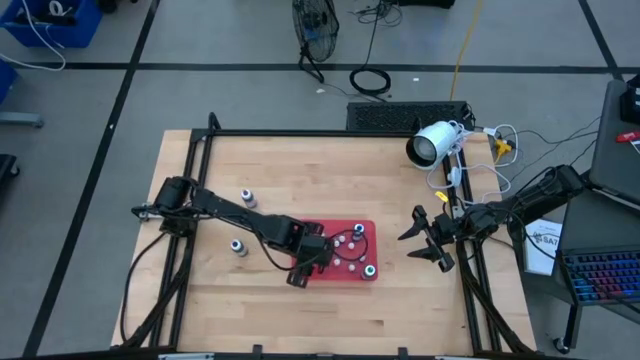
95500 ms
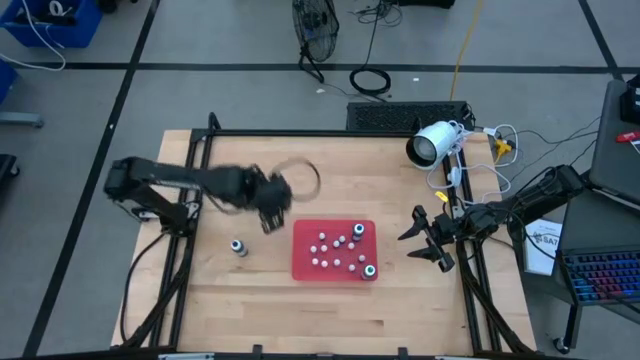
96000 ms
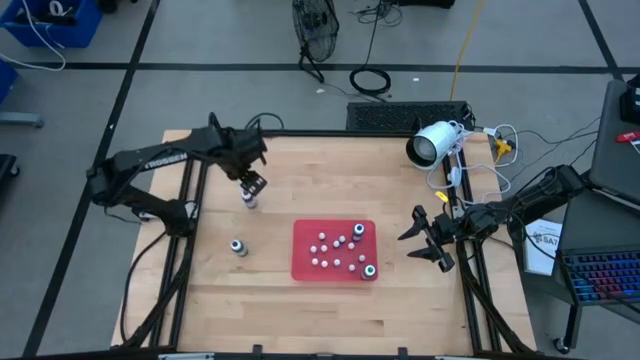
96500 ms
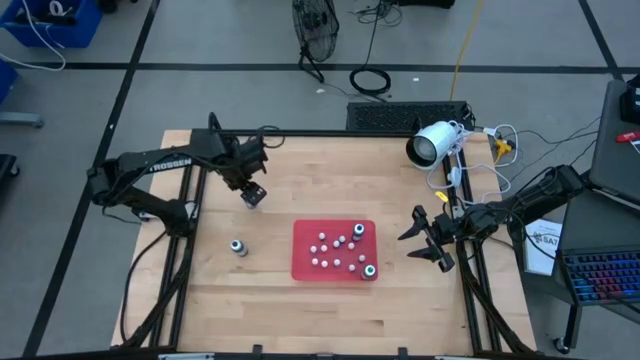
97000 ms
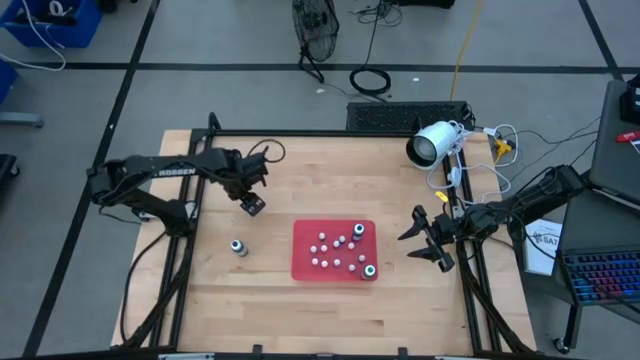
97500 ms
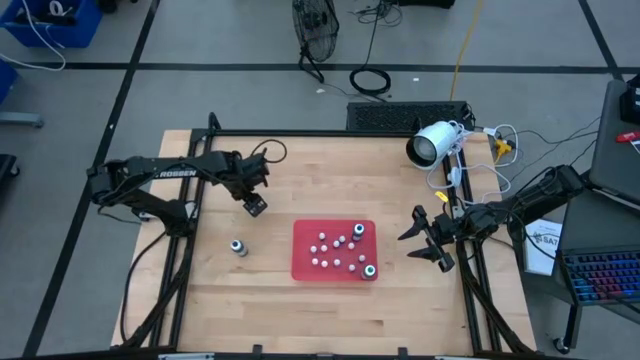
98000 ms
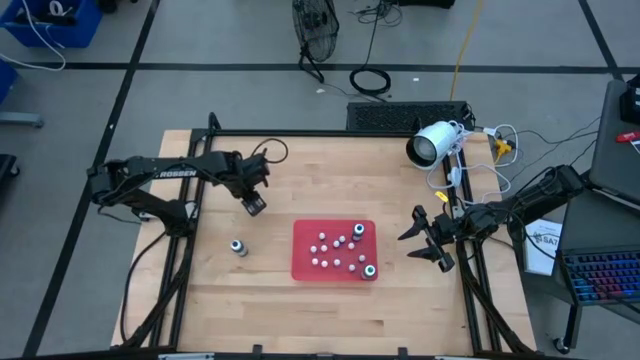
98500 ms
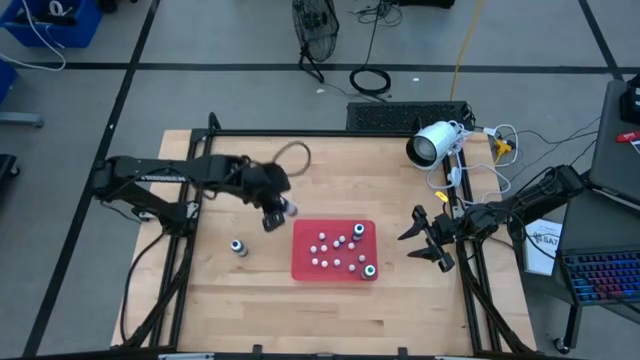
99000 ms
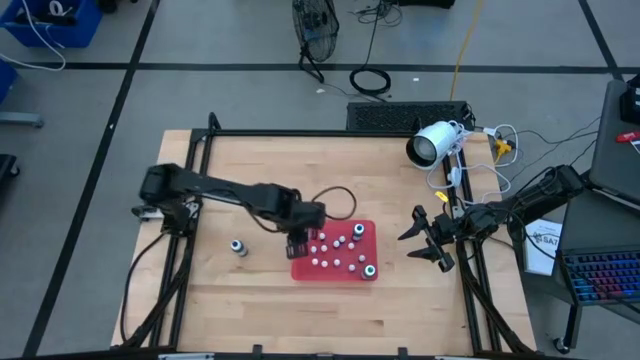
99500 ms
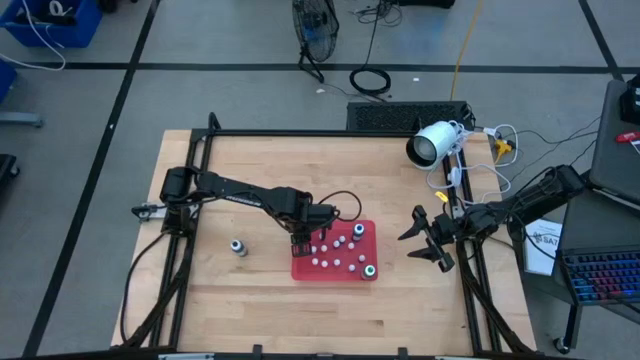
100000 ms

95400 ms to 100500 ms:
Task: Pick & Place food coloring
Put the large violet food coloring bottle into the pink bin

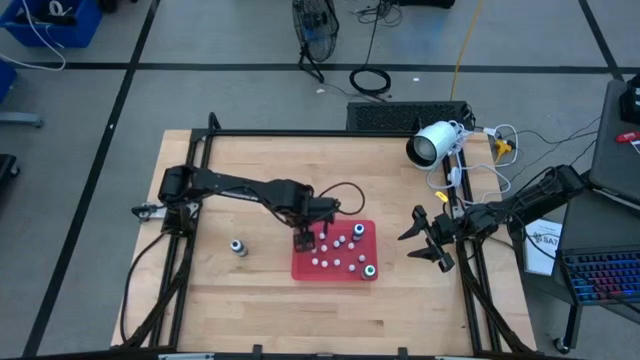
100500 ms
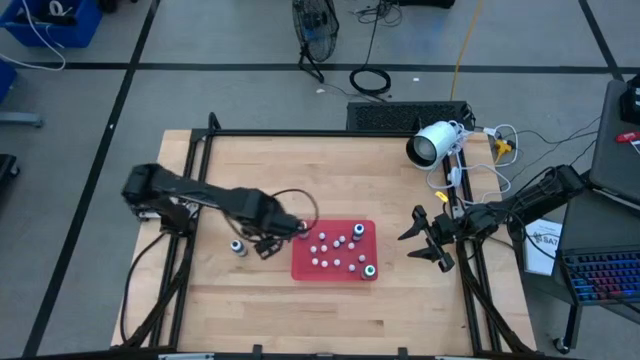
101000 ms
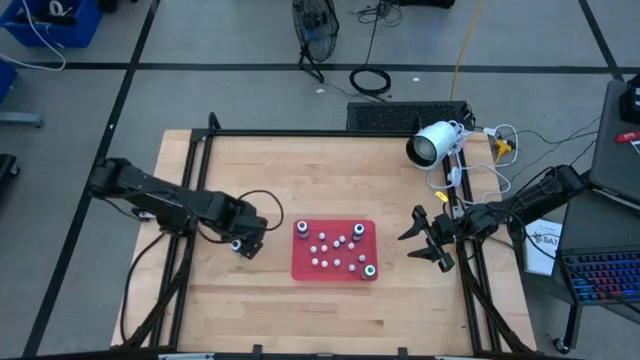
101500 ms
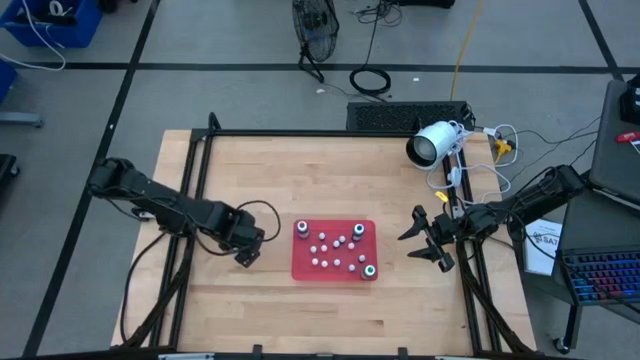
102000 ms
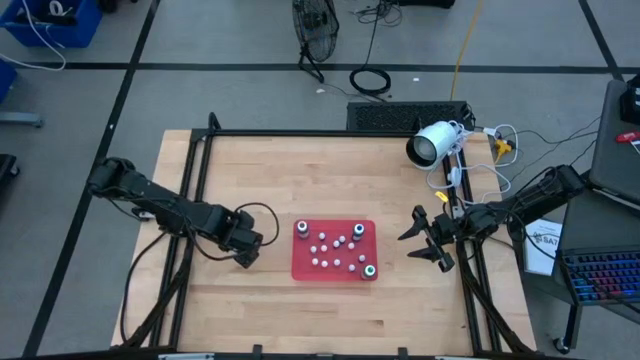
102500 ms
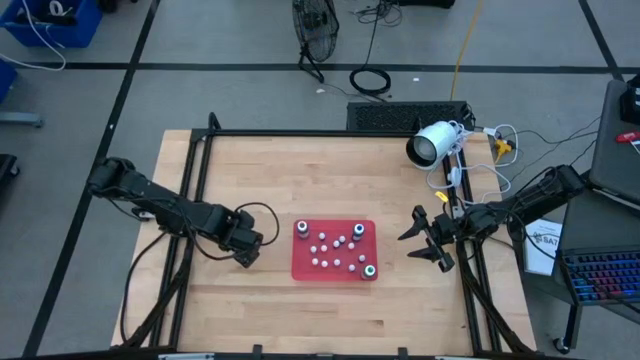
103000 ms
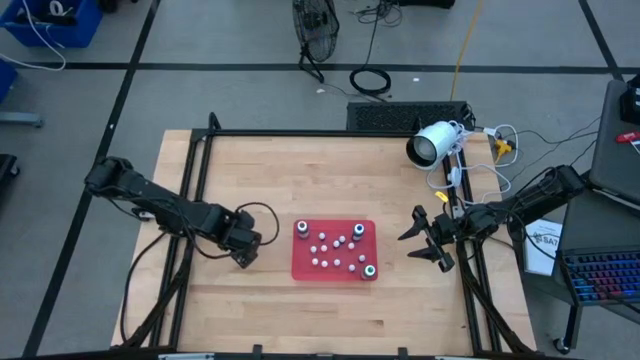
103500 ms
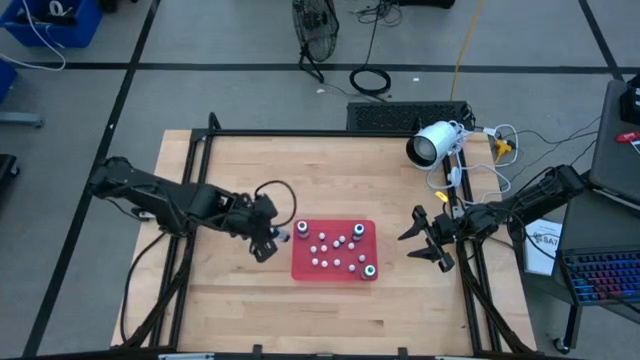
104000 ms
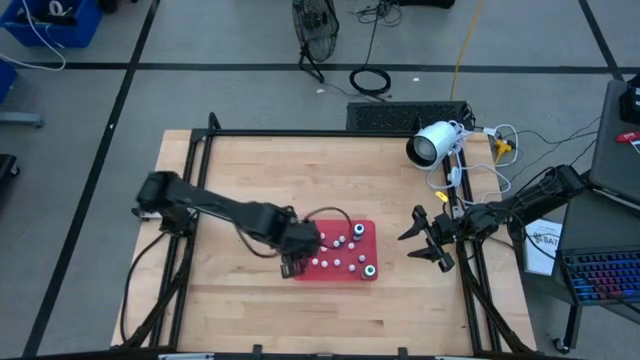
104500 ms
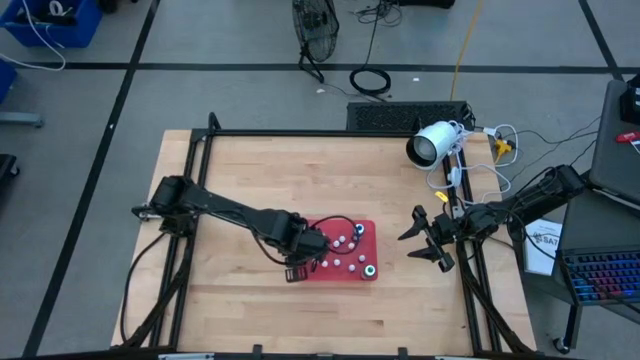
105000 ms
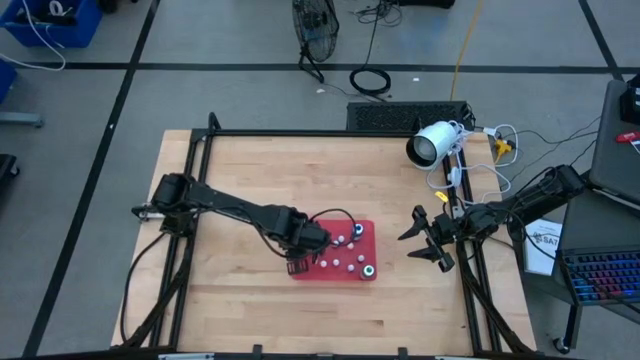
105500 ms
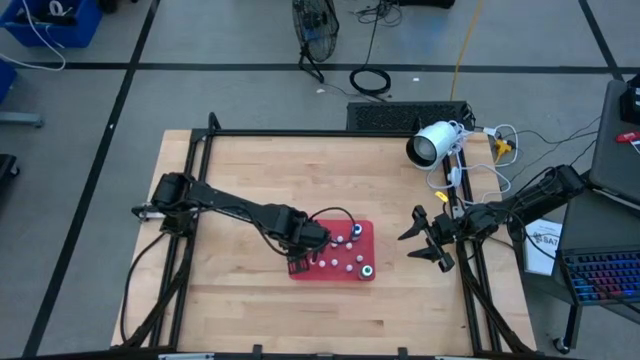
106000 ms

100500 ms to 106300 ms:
Put the large black food coloring bottle into the pink bin

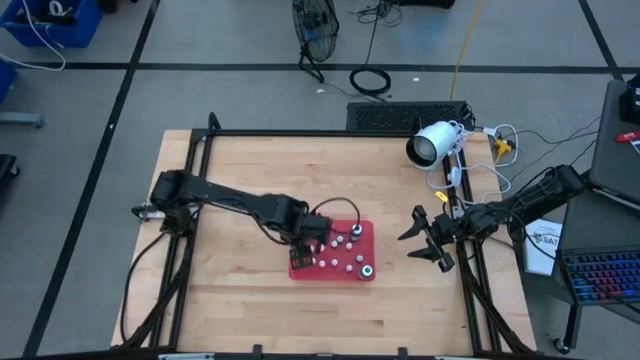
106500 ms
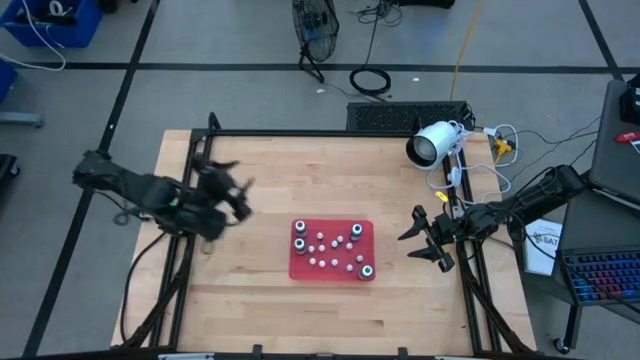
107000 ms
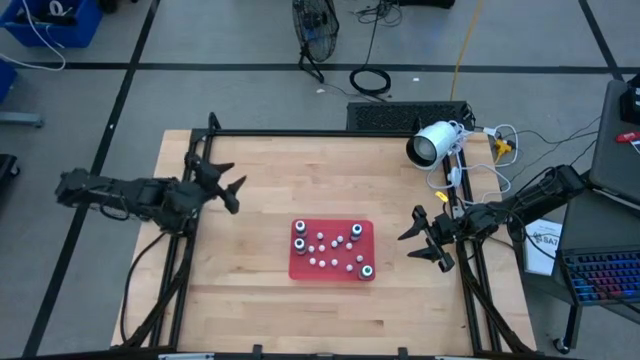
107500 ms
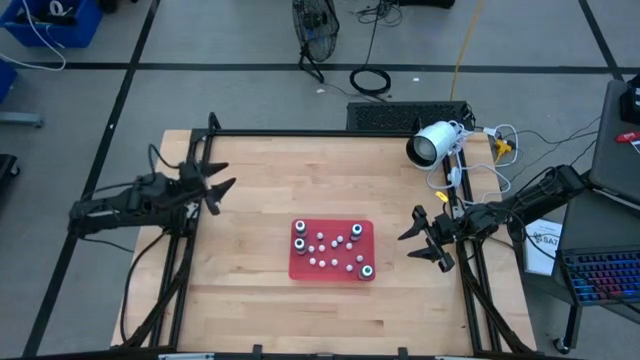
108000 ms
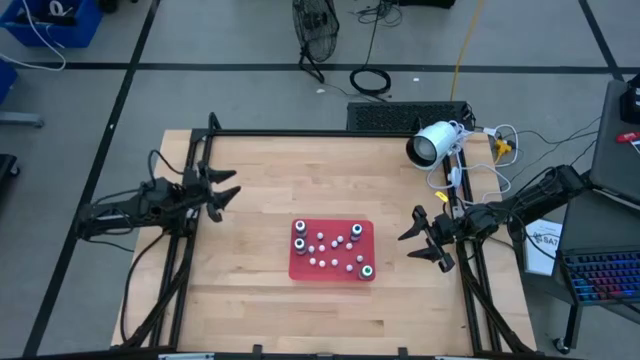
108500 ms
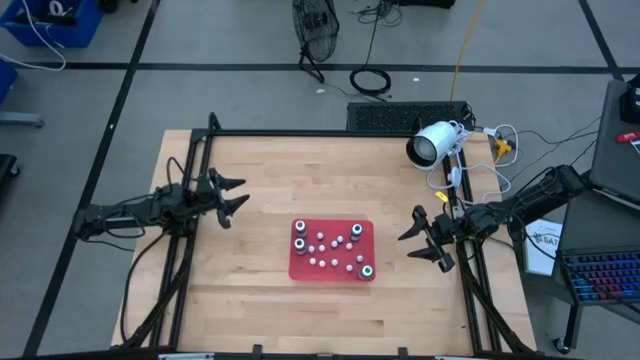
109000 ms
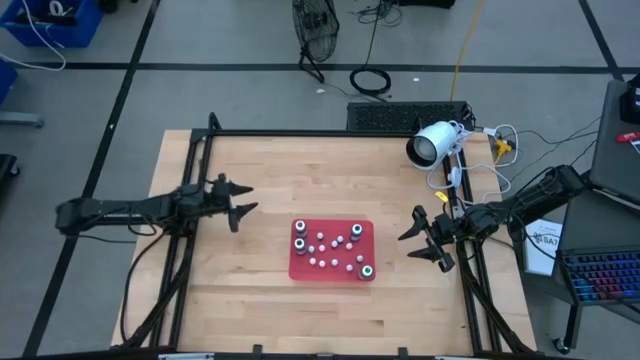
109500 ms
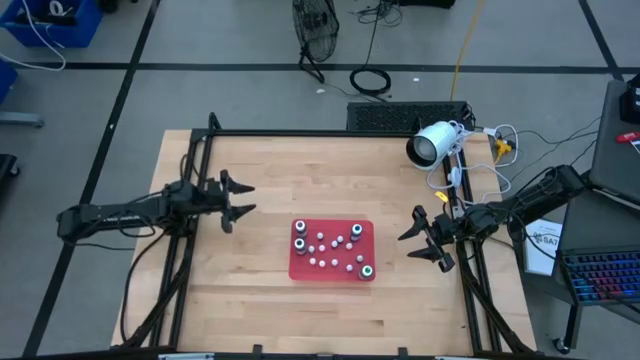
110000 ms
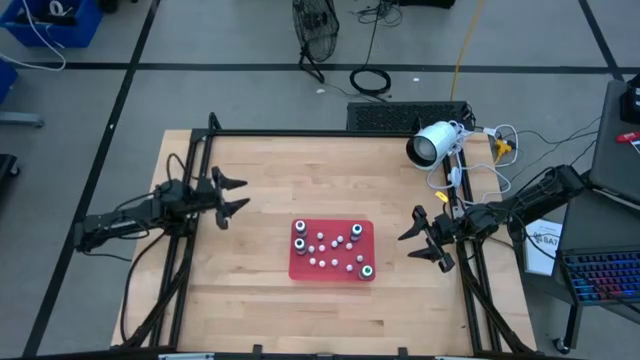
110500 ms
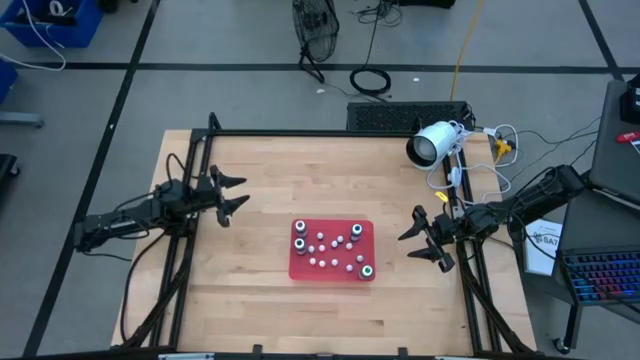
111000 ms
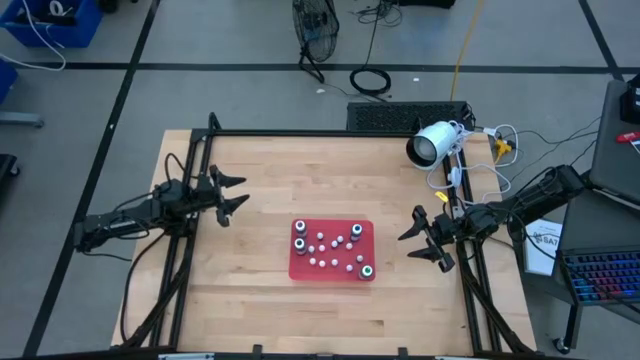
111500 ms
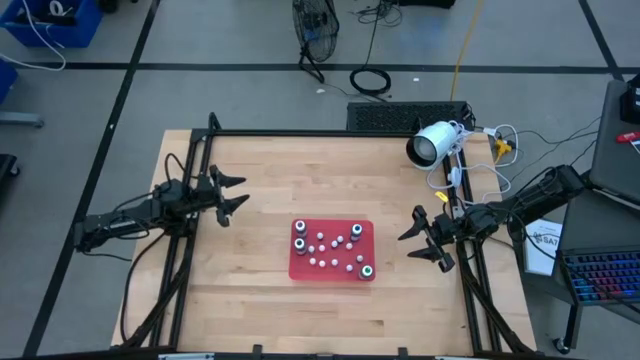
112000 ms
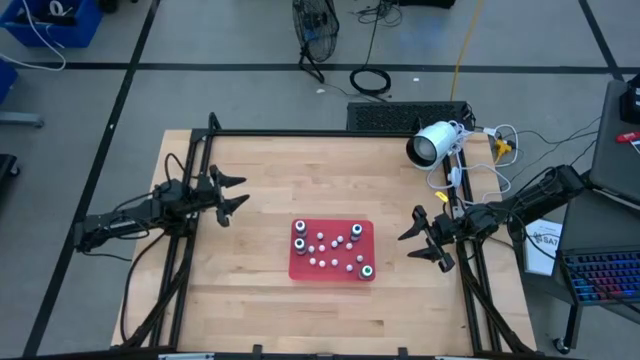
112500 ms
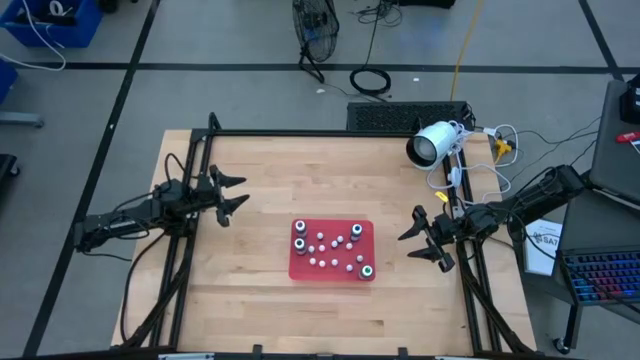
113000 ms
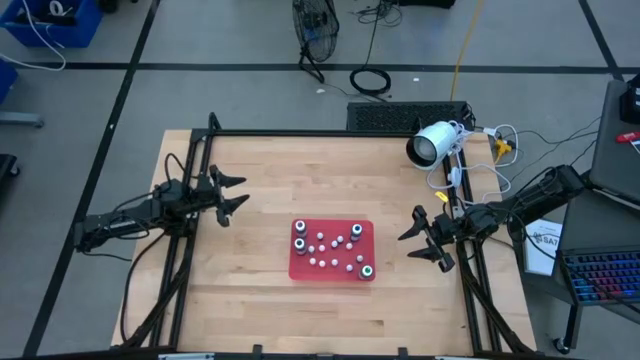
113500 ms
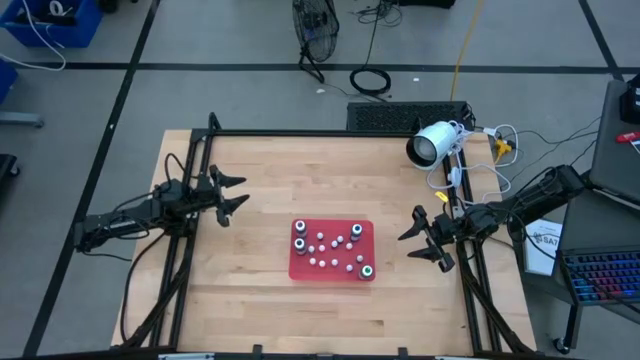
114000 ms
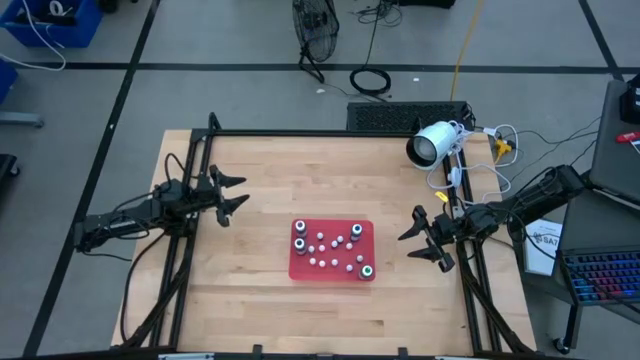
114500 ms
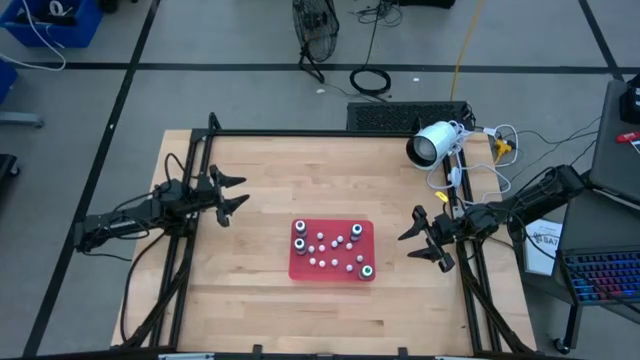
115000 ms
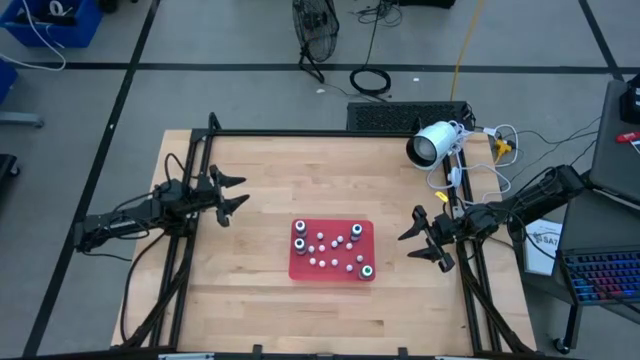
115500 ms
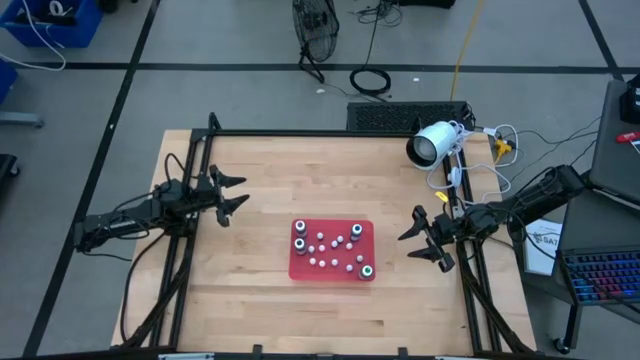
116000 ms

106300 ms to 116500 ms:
Return to Home Position

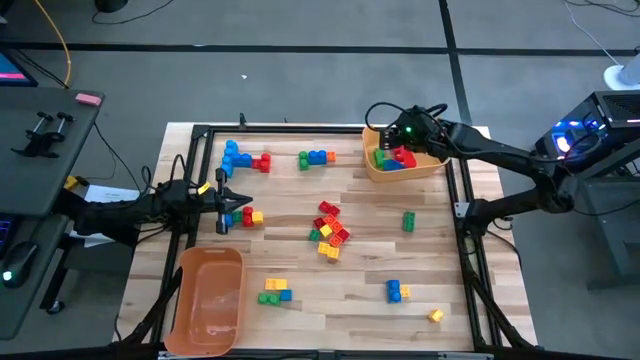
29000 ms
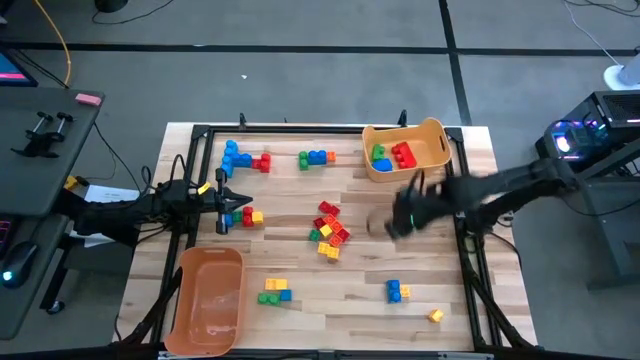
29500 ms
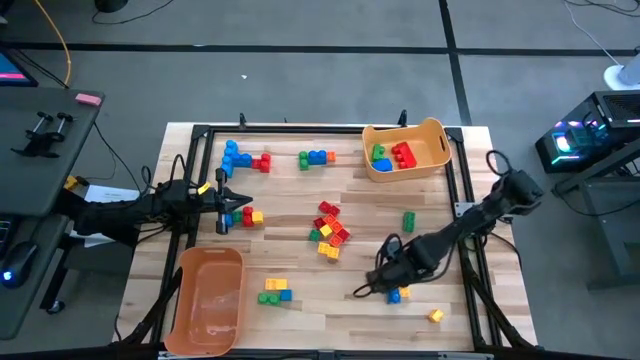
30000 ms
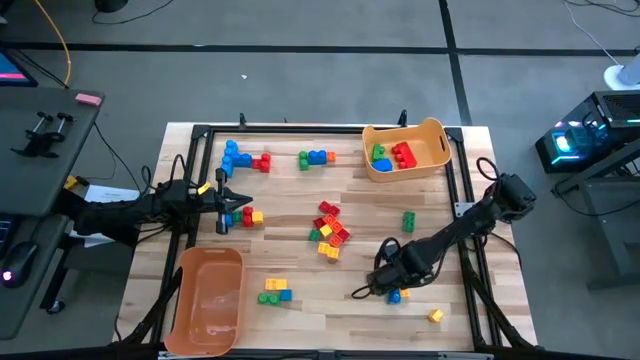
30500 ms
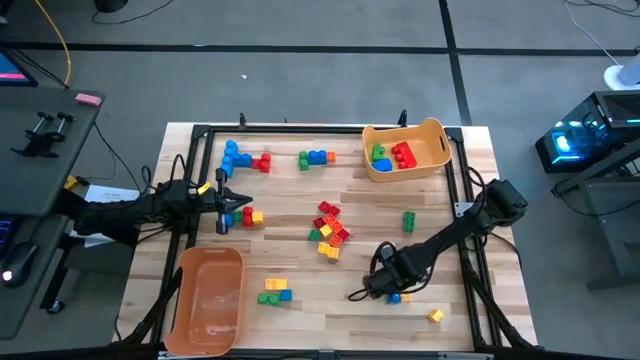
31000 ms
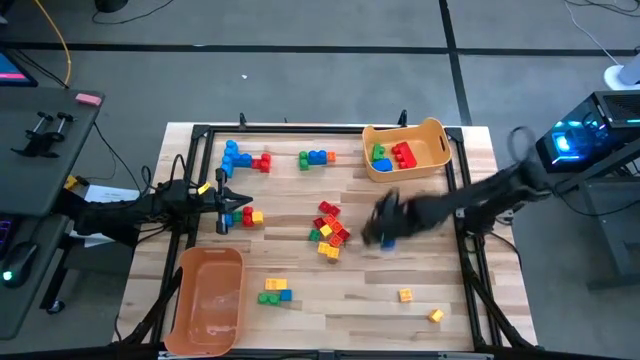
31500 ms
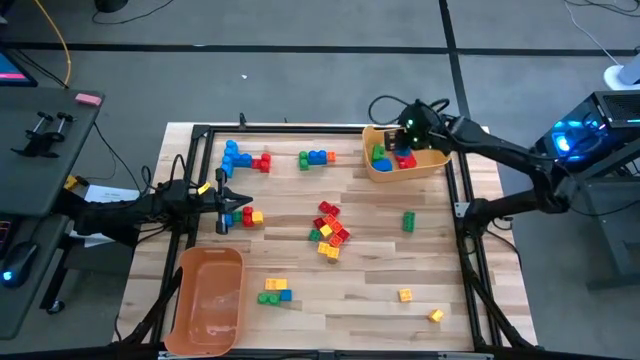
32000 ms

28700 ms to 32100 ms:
Task: Sort blocks by size
Put the blue game piece into the yellow bin
